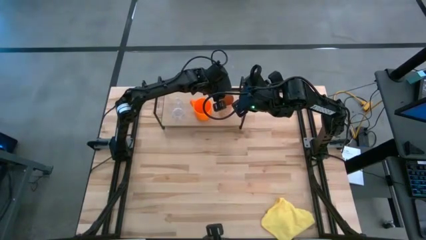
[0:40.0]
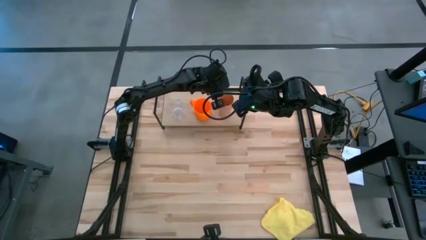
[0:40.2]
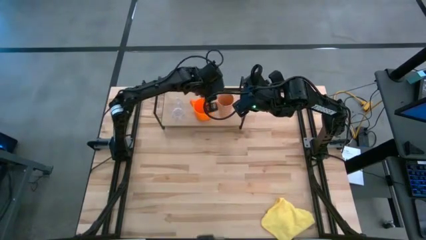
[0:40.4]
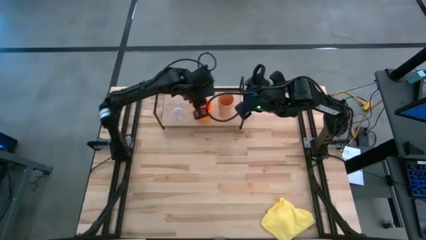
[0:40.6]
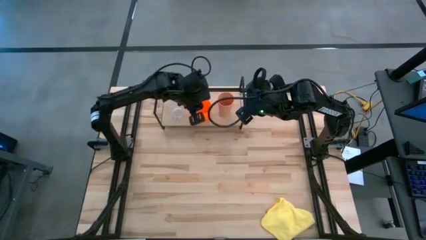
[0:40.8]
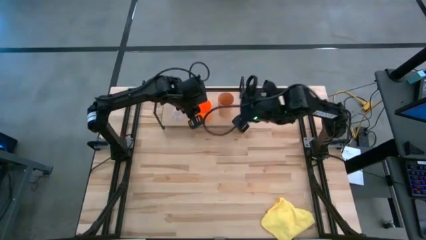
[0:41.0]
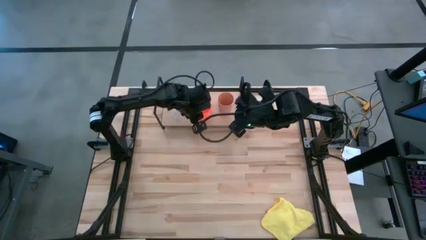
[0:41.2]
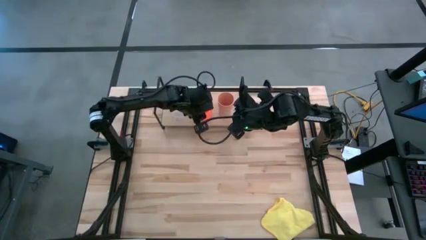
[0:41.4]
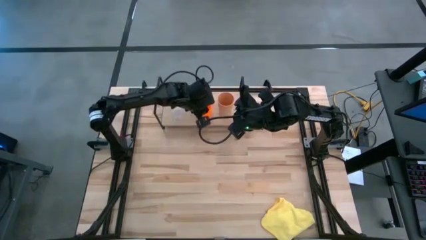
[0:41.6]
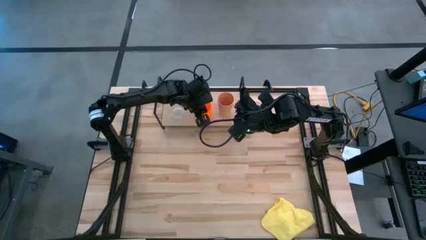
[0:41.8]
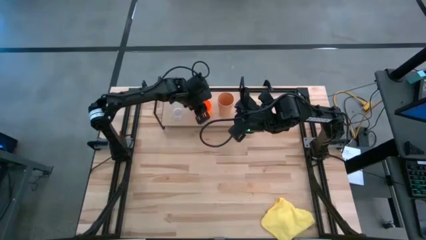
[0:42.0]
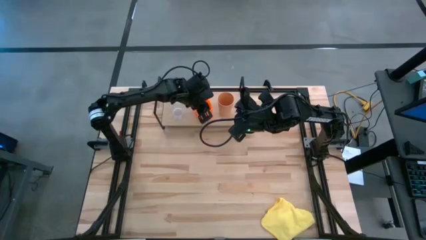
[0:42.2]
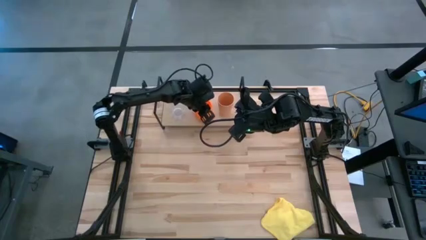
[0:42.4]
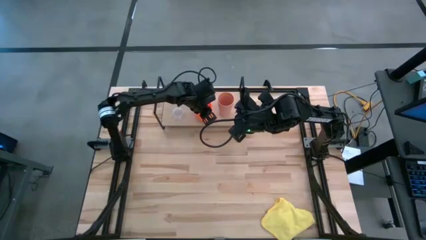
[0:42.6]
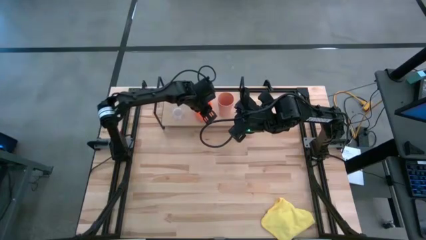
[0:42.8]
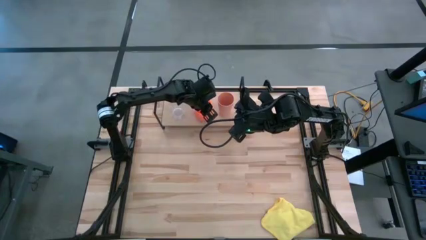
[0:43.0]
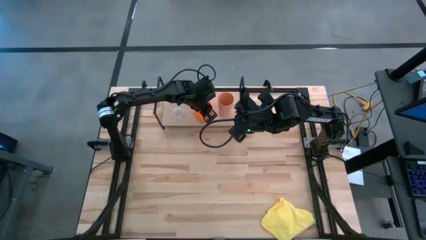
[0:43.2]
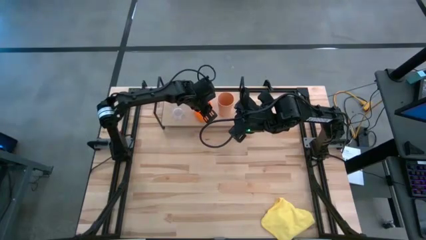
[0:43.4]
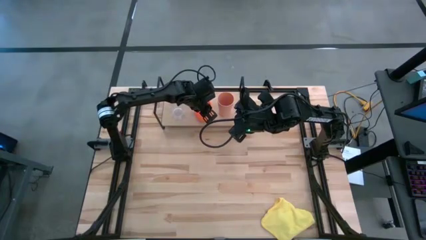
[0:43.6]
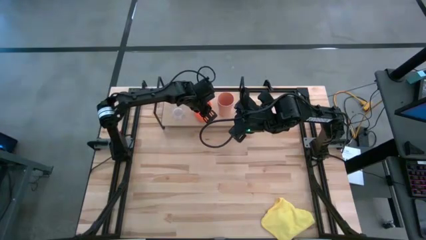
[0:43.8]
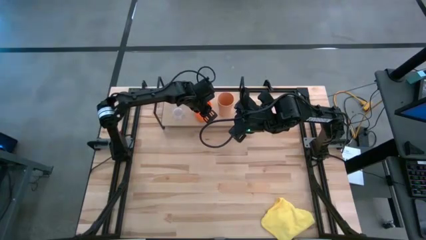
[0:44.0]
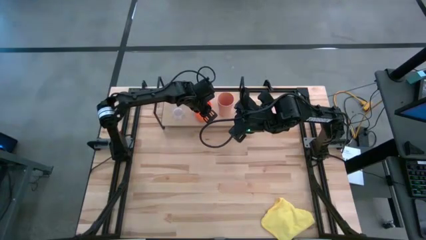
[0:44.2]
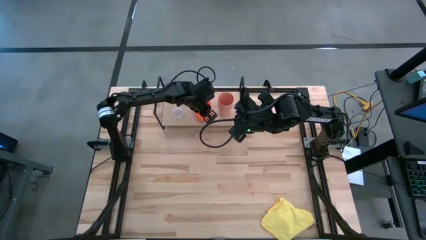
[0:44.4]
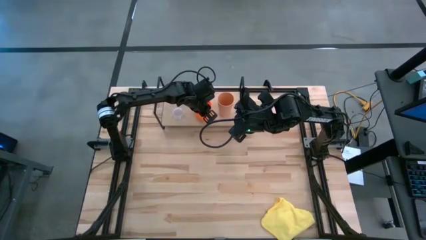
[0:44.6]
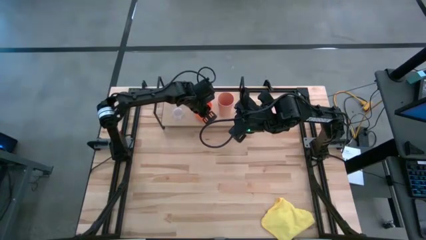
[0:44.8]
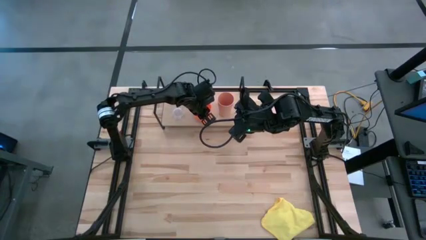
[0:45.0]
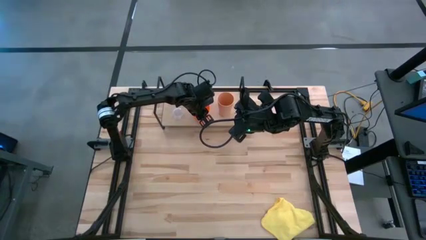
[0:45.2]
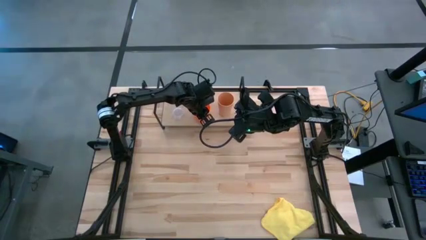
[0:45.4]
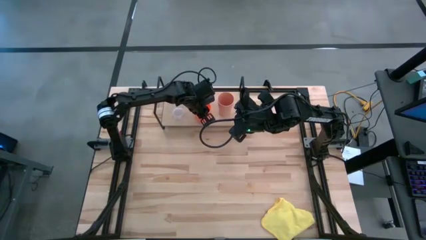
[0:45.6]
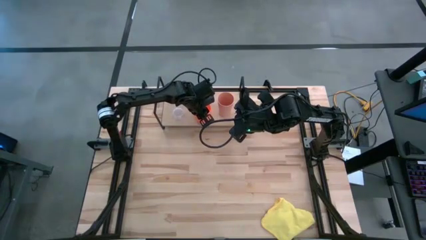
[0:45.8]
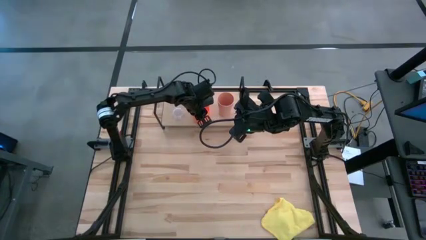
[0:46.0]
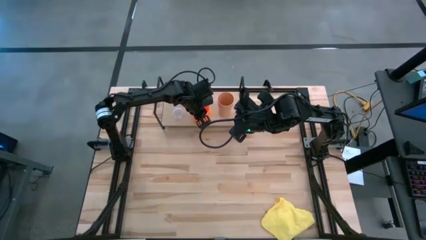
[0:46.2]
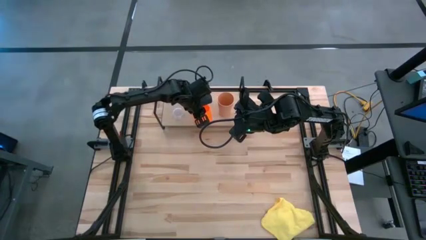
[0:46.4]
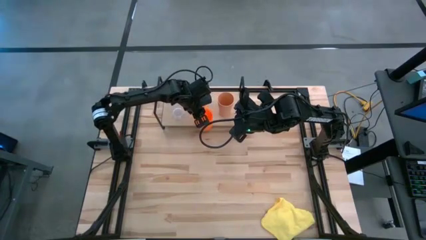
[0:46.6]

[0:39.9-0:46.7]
Task: Stack small to large cups/mugs on shelf
Adjust the orange mug

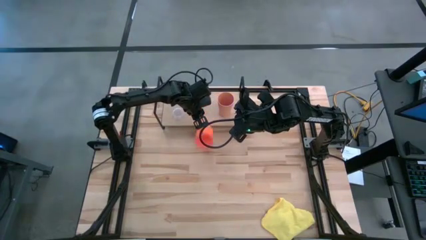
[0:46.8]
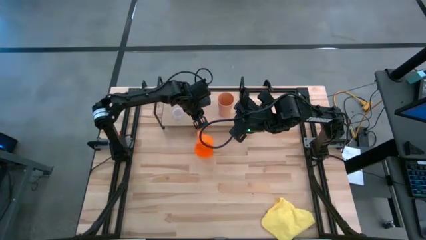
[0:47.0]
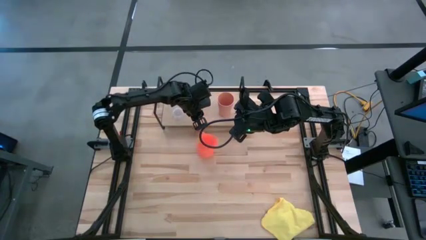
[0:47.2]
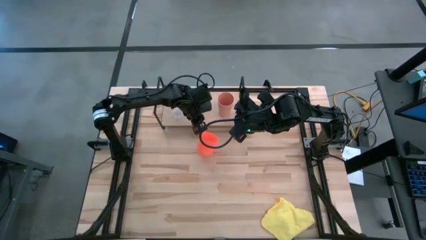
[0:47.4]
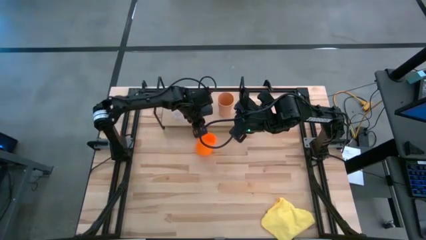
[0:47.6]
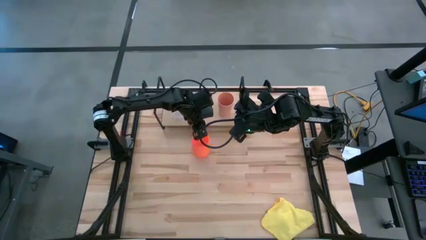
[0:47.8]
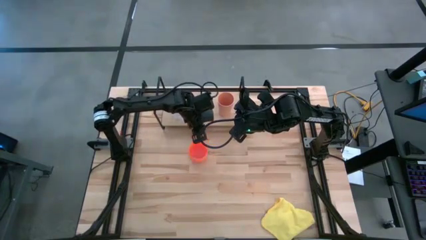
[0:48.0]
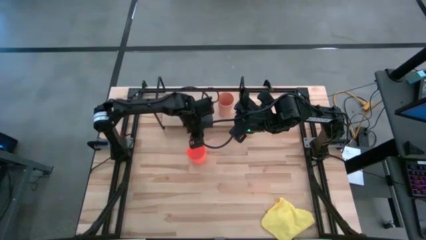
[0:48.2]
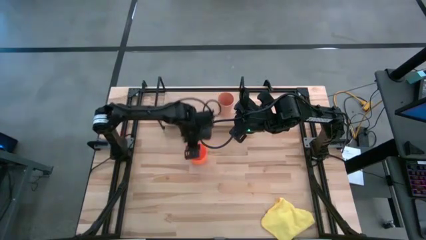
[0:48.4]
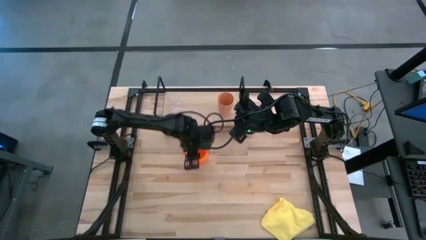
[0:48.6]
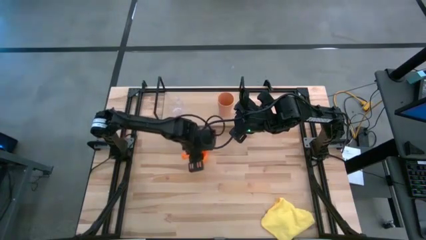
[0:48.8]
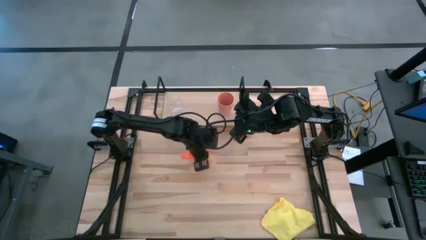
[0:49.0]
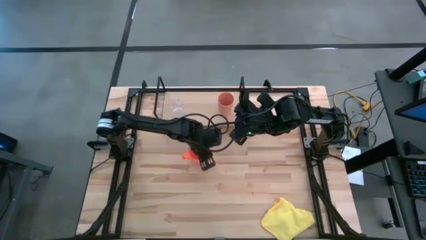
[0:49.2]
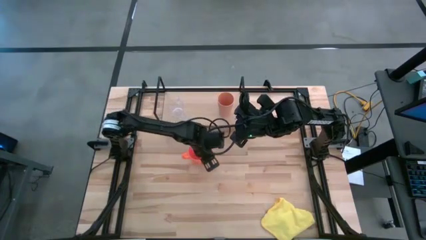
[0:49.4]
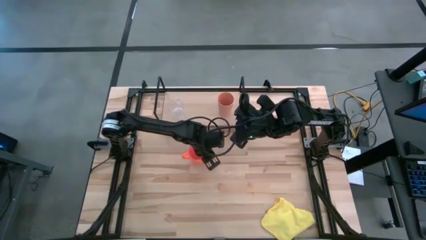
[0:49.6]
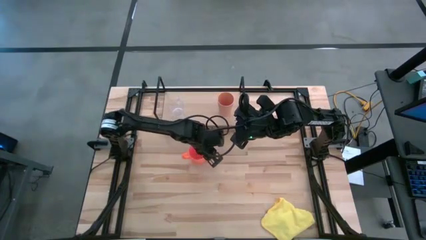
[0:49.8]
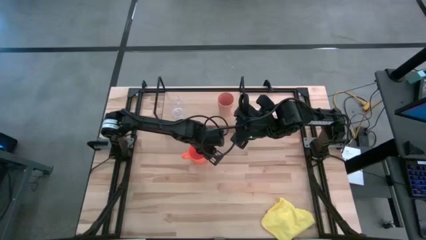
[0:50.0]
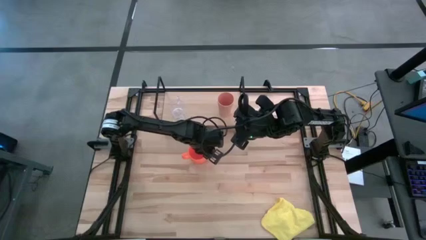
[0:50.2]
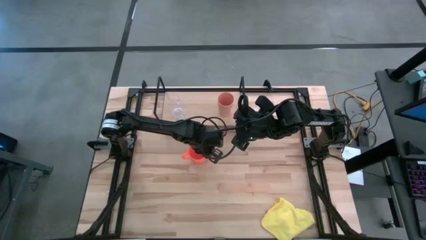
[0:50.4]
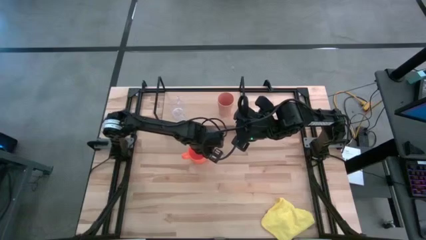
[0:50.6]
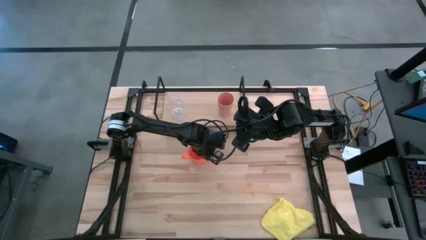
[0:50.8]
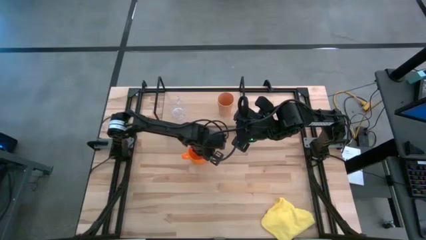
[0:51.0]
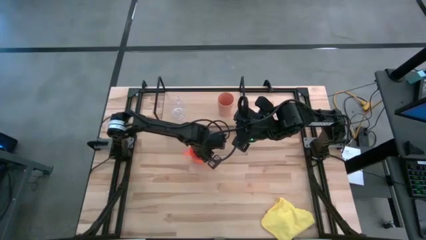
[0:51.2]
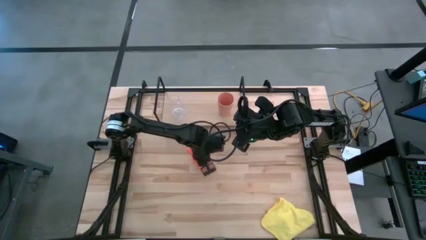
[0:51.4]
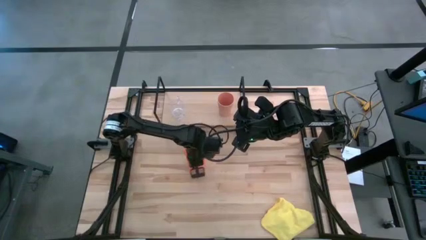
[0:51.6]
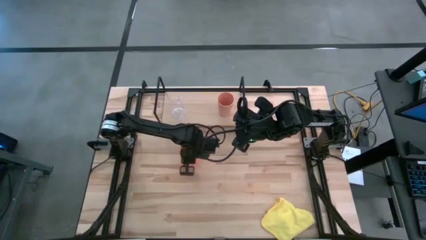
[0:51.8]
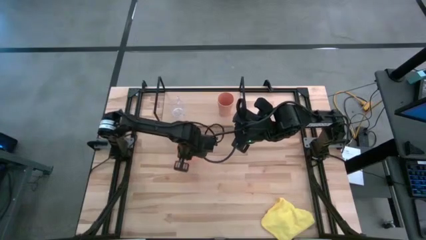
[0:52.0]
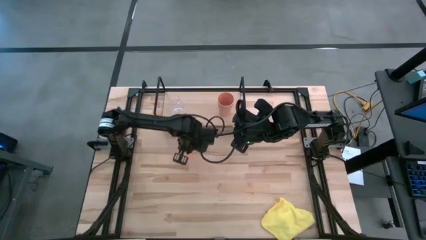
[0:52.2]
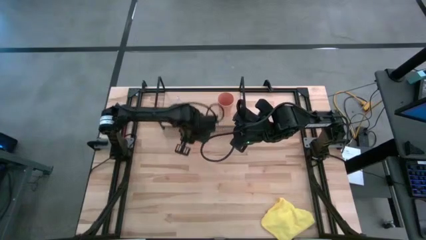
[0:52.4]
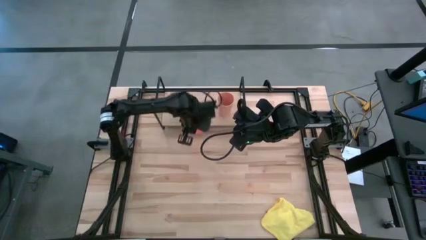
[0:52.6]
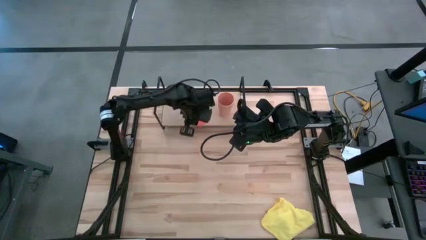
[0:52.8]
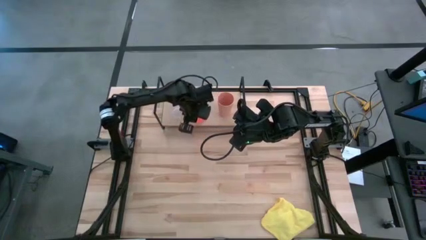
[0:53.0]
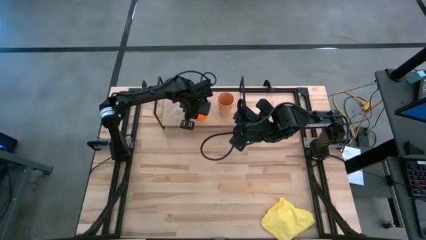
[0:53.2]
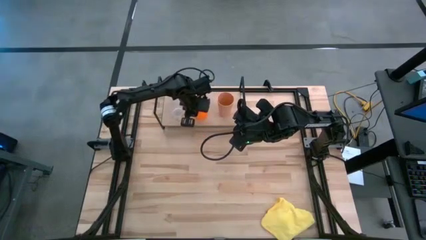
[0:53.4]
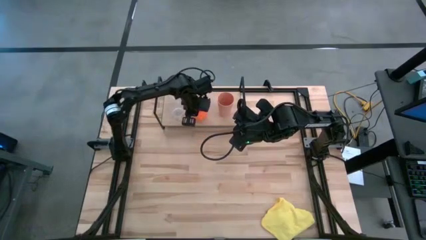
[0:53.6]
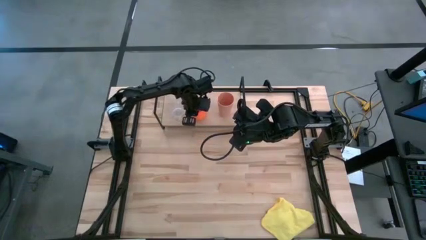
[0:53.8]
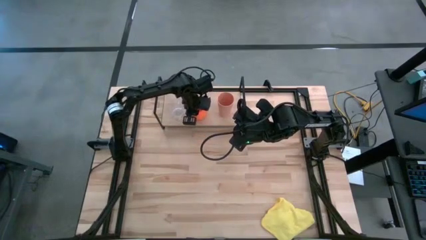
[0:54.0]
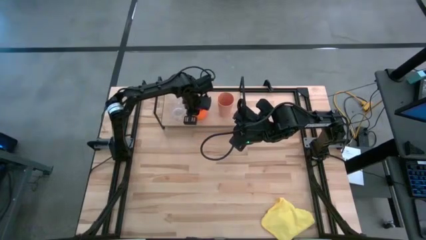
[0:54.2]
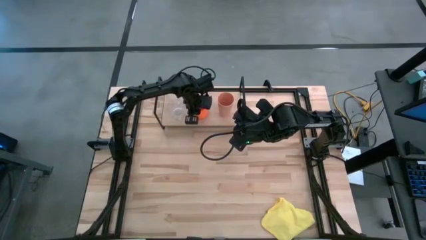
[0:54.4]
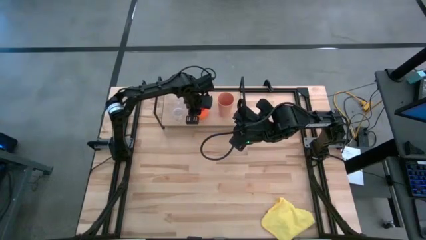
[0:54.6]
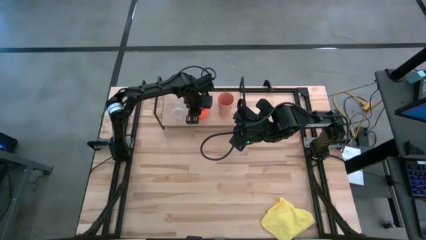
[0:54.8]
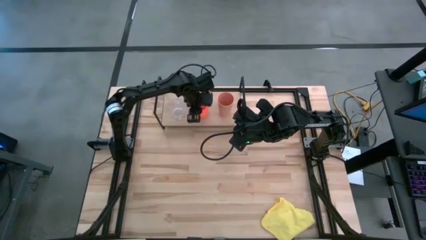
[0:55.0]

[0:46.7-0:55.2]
Put the orange mug on the shelf
